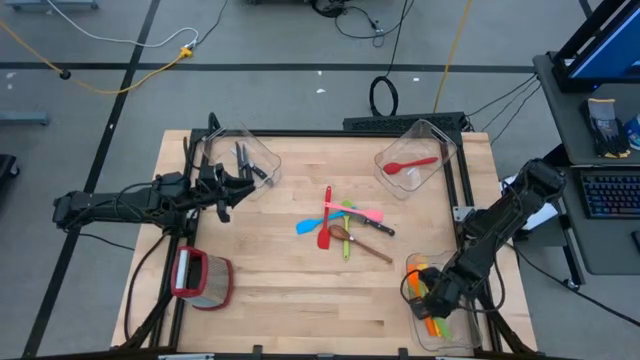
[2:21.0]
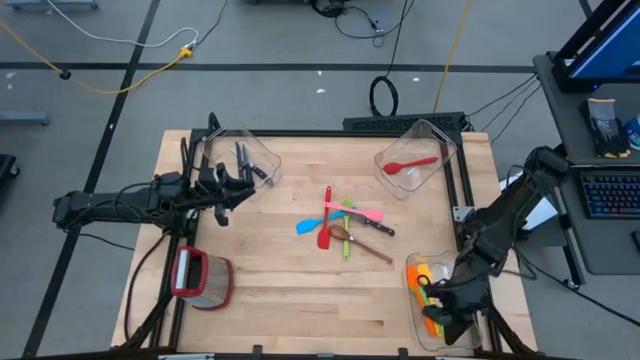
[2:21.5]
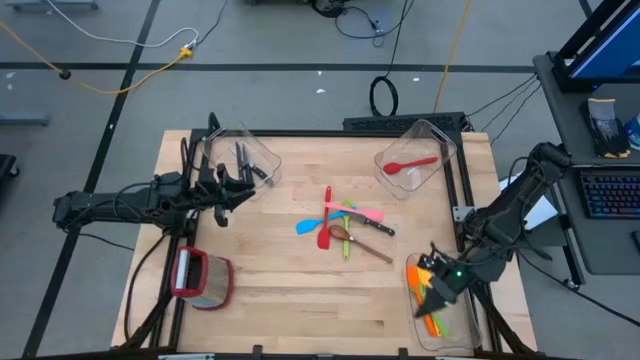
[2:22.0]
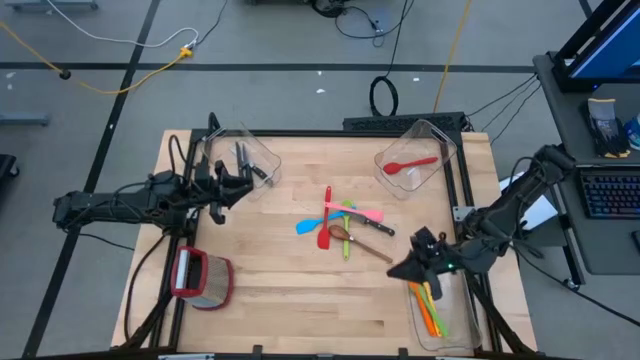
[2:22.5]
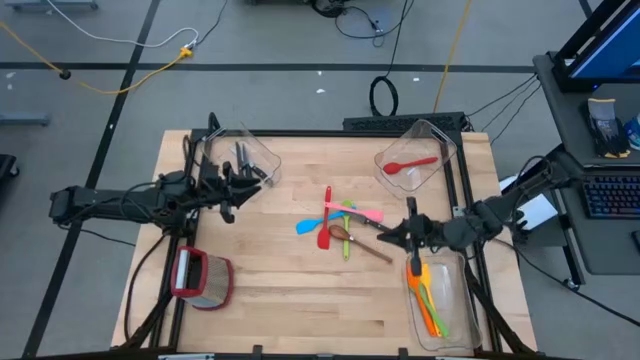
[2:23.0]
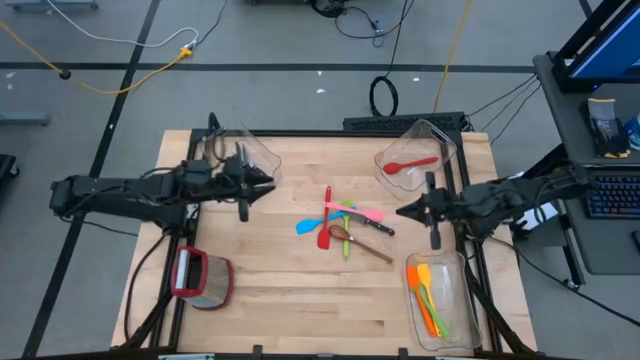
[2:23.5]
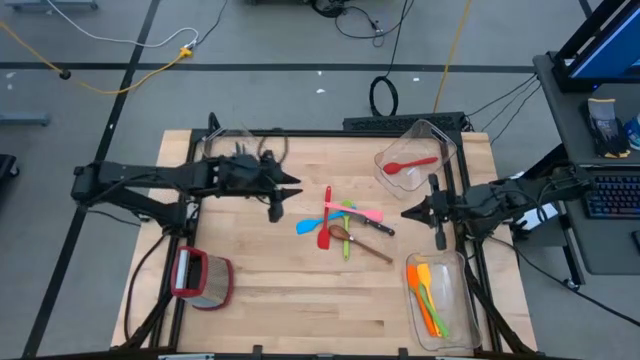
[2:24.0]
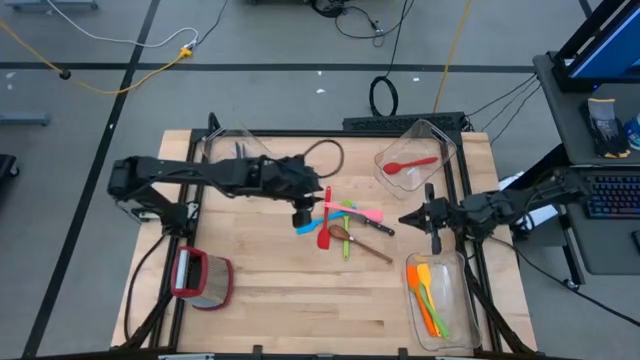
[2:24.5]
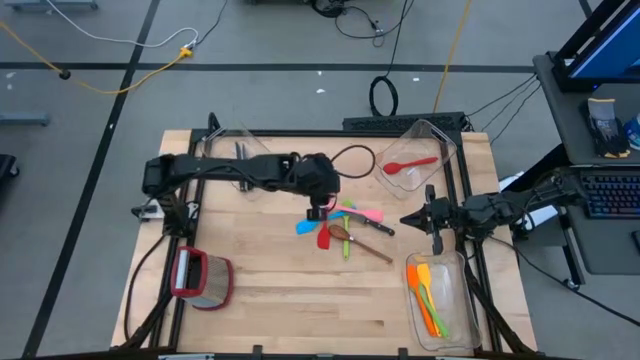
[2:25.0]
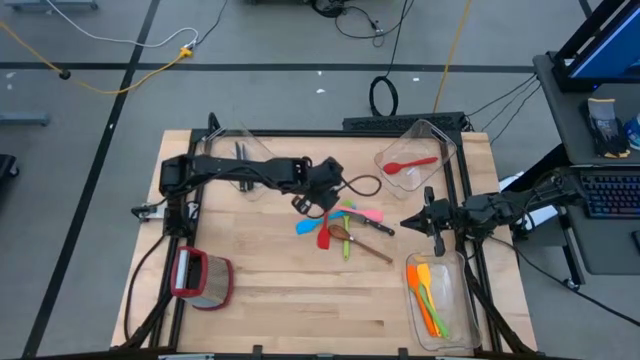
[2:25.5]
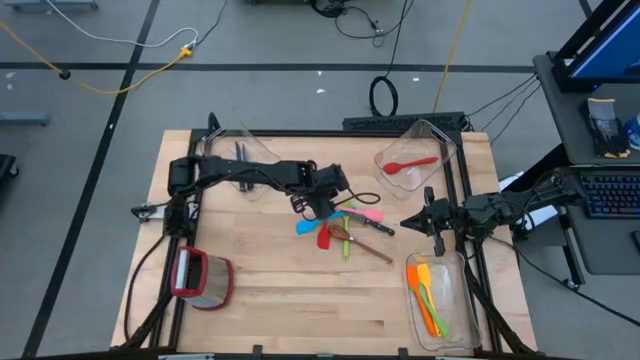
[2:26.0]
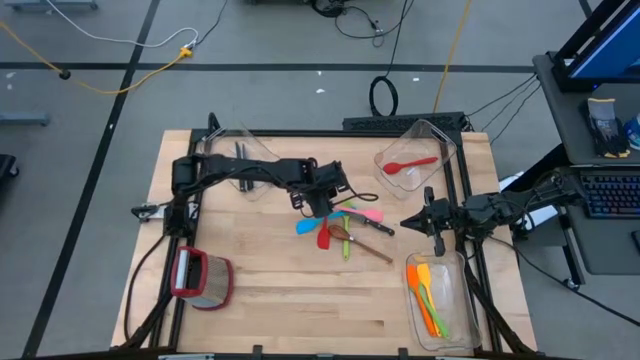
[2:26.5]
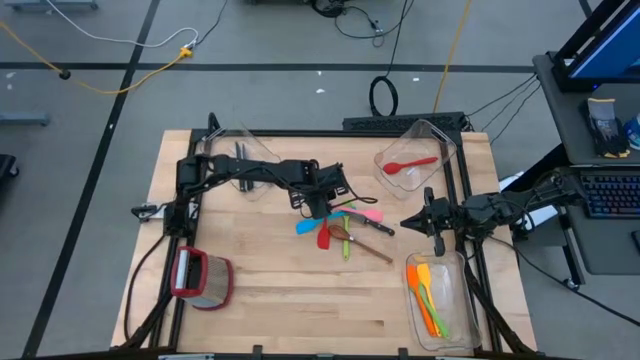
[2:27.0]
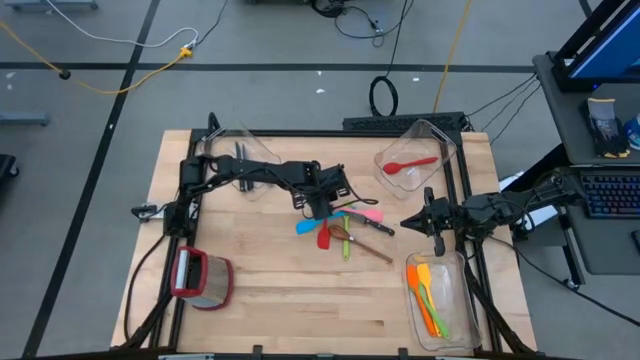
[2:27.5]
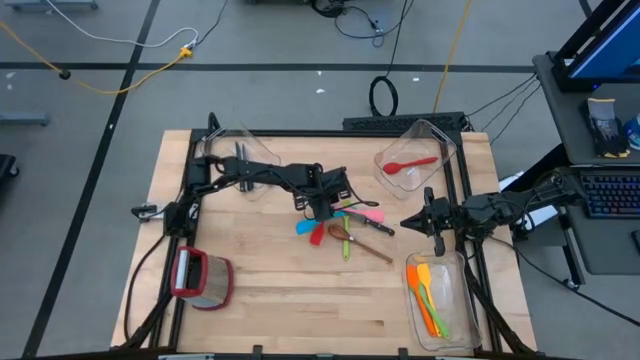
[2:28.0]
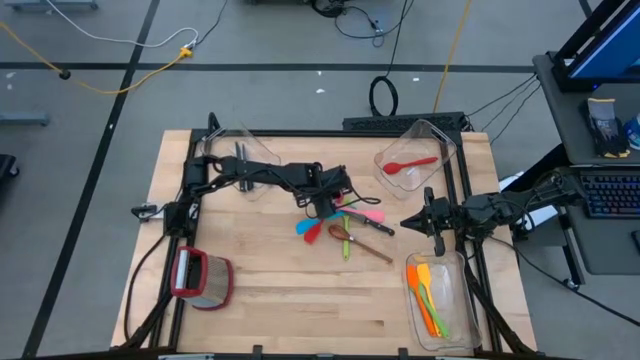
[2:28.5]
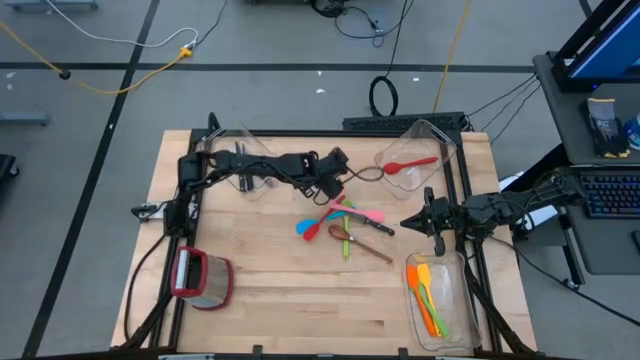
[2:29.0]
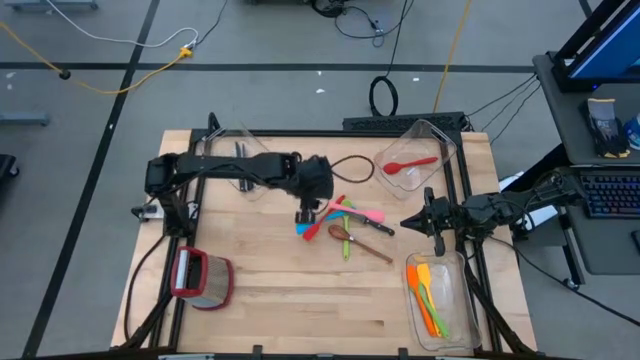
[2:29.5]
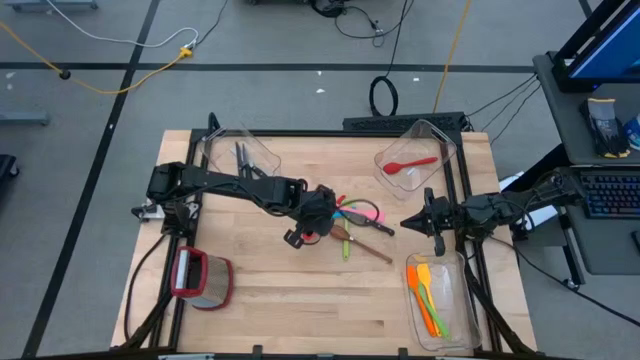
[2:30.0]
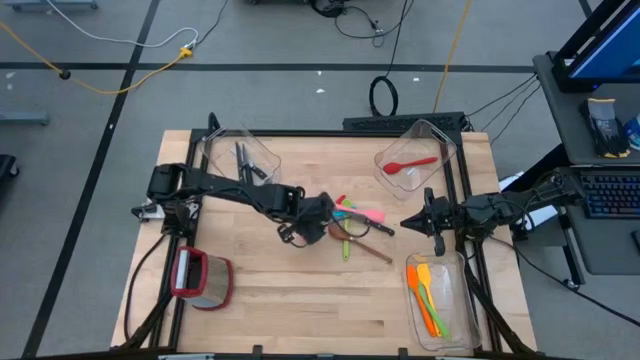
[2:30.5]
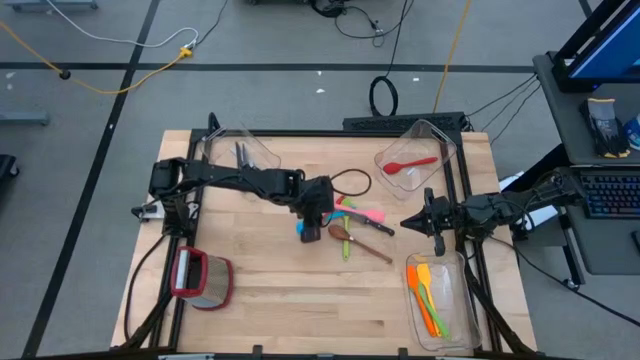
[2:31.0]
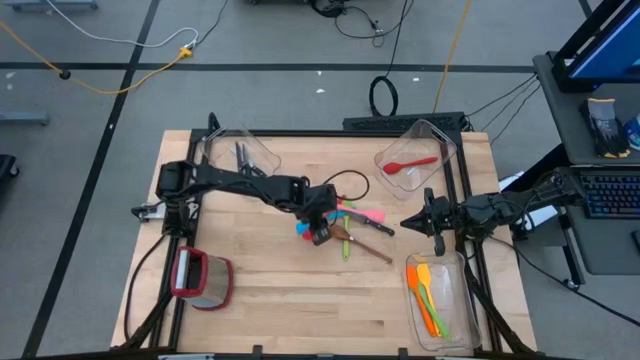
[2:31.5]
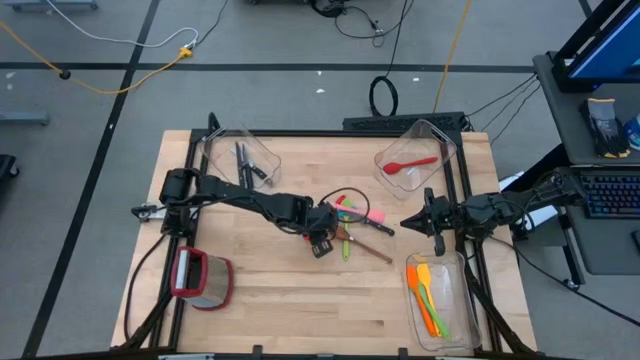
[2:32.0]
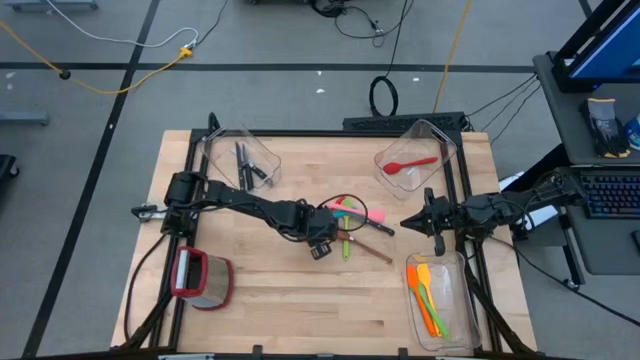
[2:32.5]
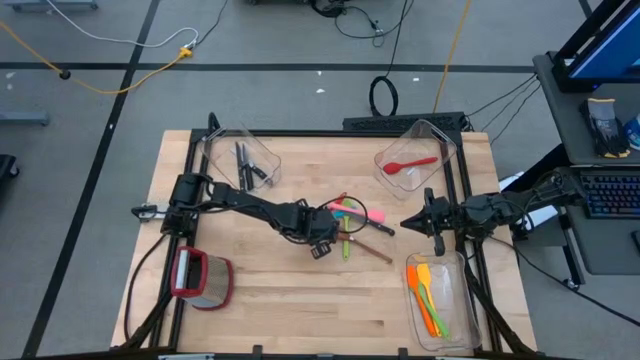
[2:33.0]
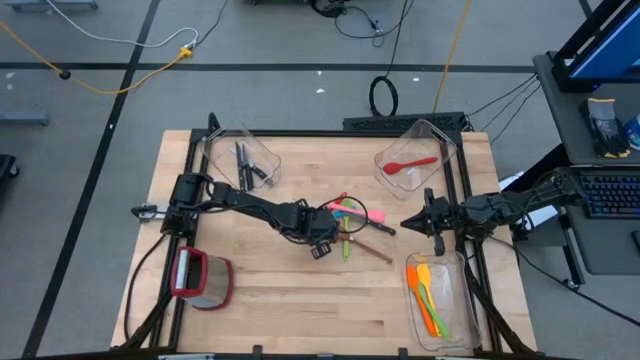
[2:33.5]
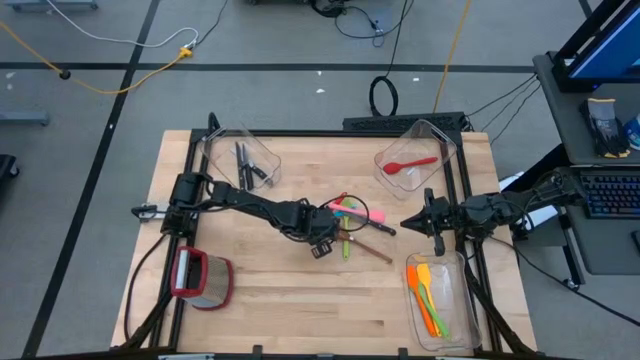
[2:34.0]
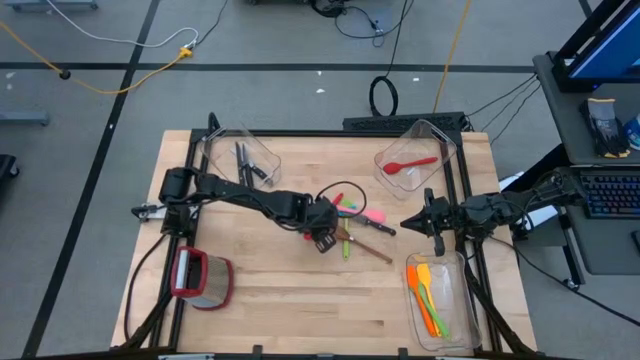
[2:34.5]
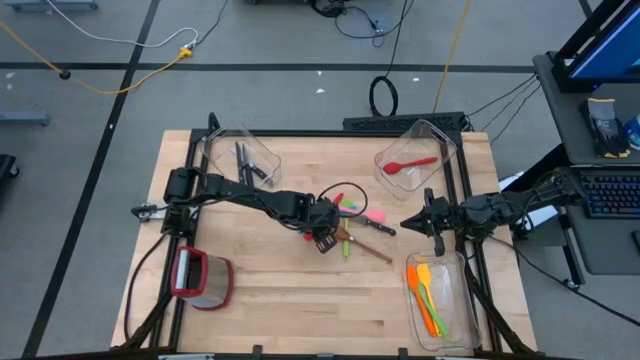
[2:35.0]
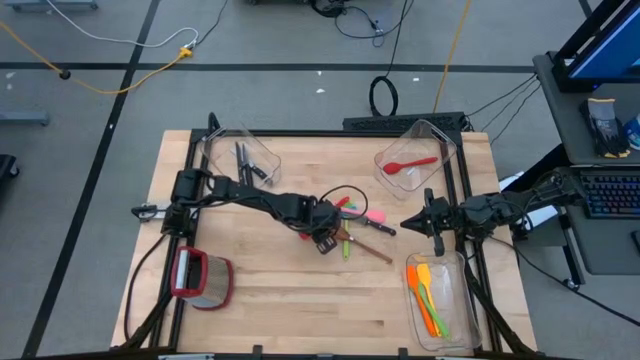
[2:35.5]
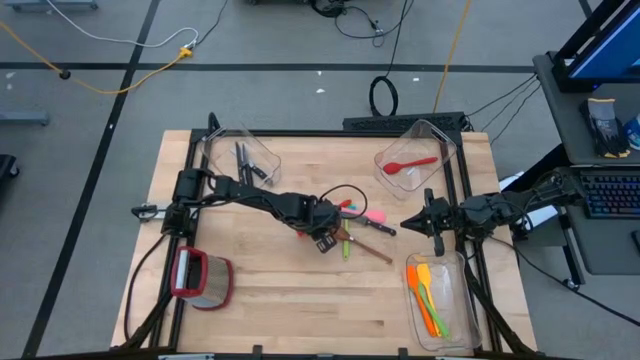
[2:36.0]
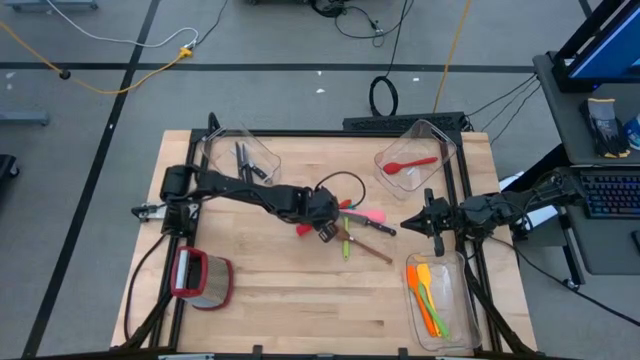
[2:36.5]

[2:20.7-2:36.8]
Task: Pick & Place Kitchen Items
Put the red spatula into the bottom transparent bin

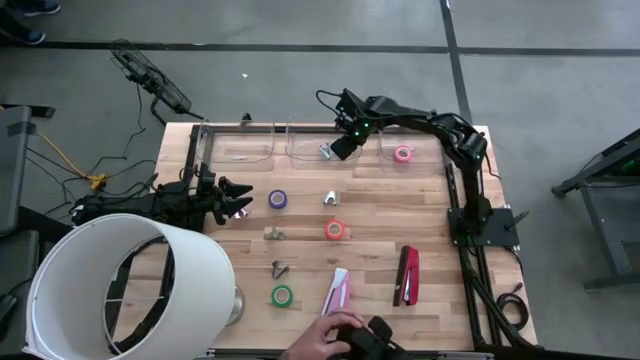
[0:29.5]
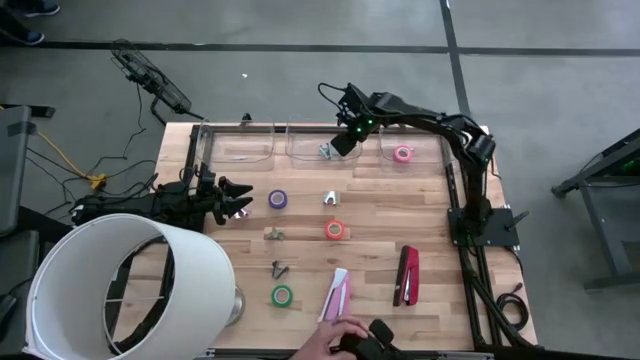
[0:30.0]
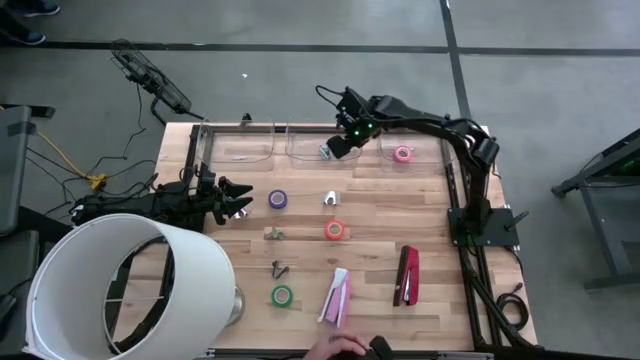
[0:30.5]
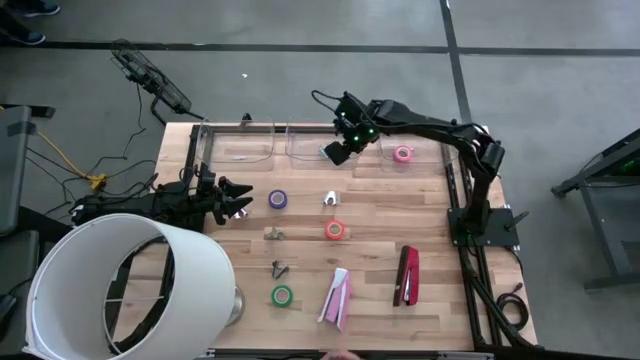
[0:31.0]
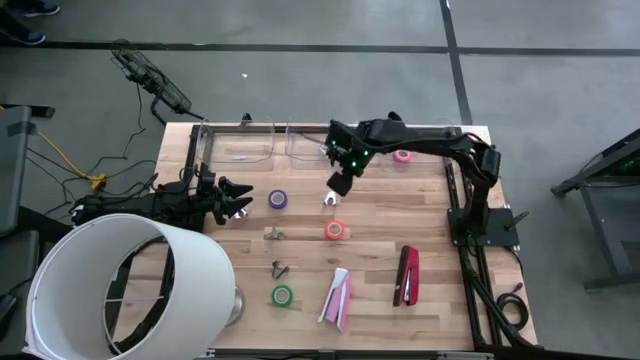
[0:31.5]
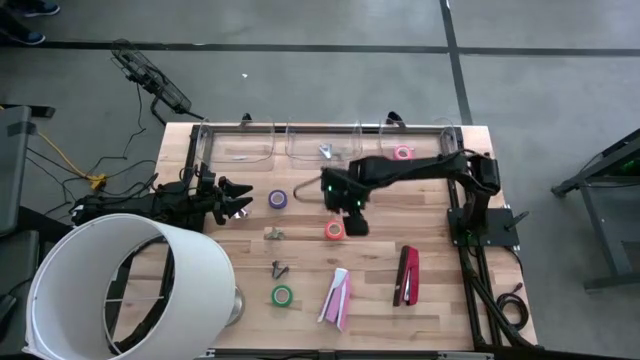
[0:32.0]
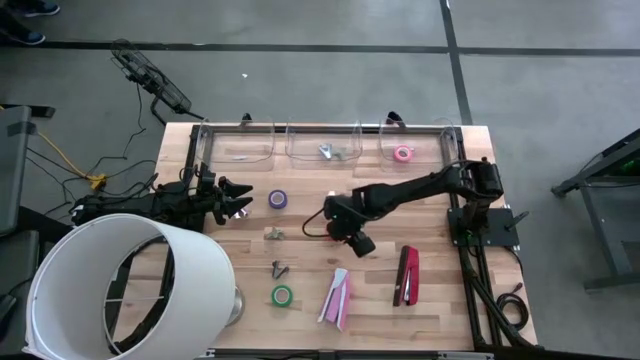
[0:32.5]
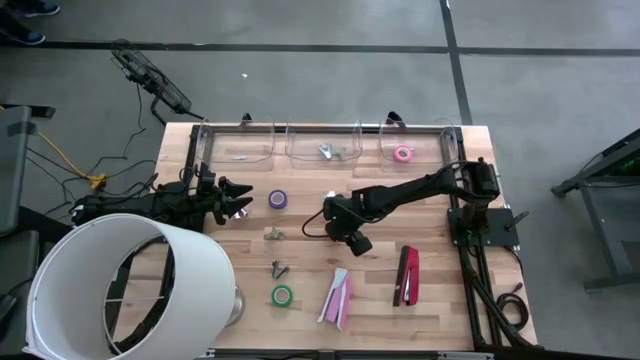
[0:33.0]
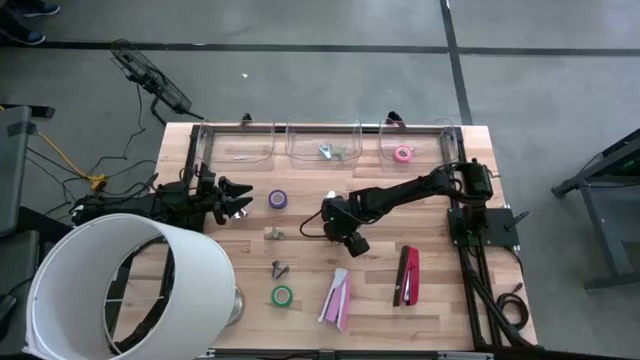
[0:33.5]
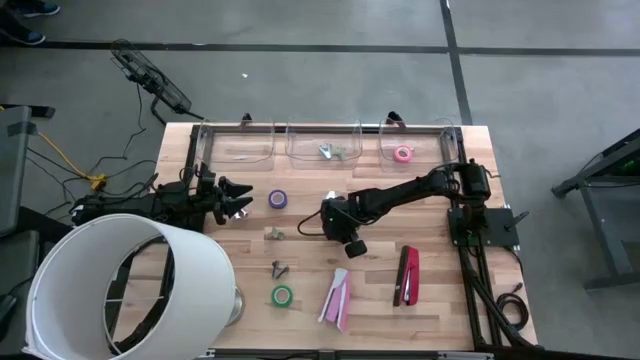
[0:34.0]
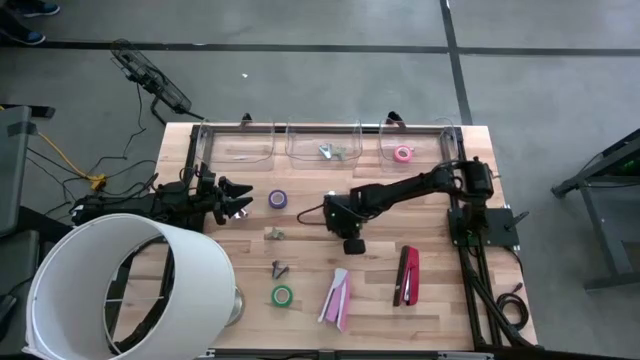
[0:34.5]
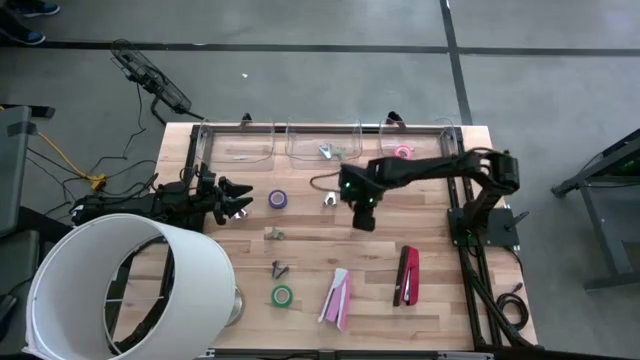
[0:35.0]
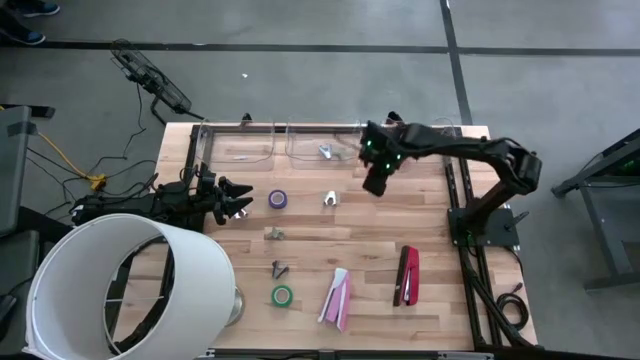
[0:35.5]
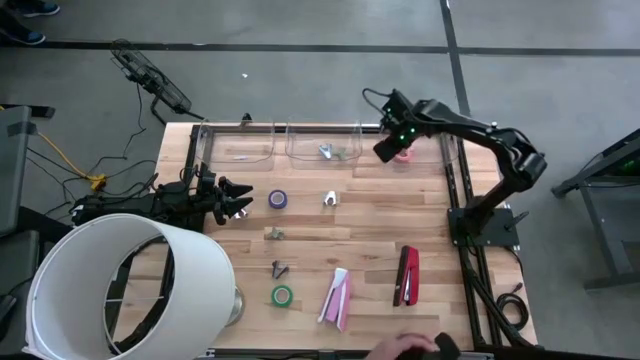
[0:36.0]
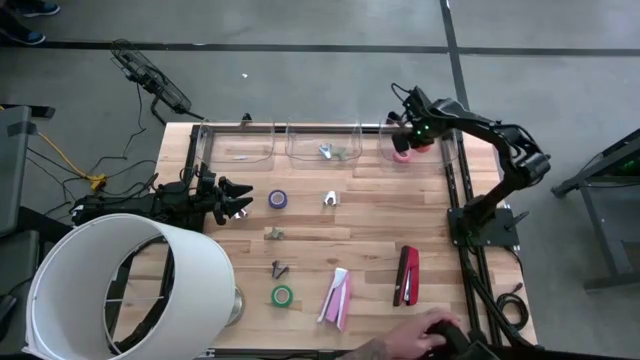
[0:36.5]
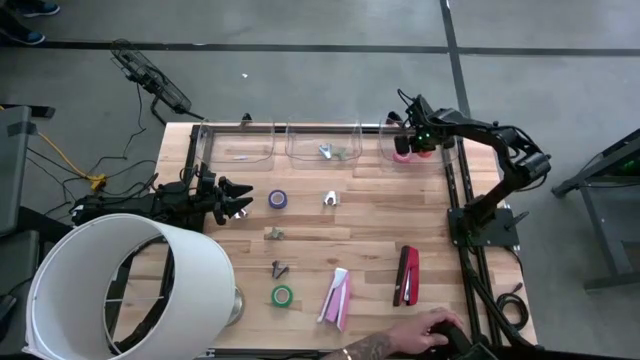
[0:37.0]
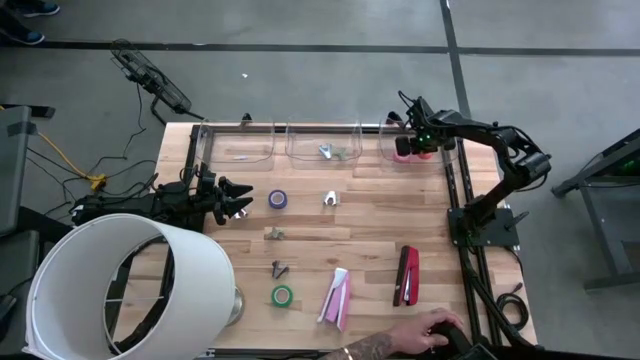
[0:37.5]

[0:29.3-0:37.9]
Task: Pick and place Stapler, Stapler remover, tape
Put the orange tape into the right transparent bin
